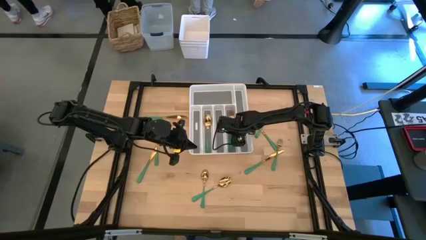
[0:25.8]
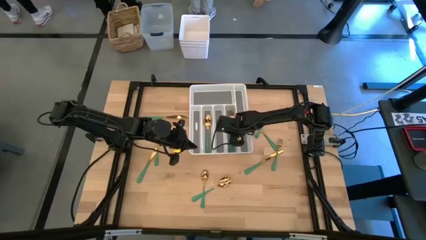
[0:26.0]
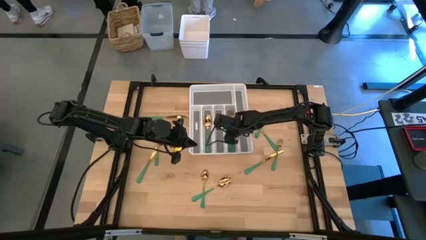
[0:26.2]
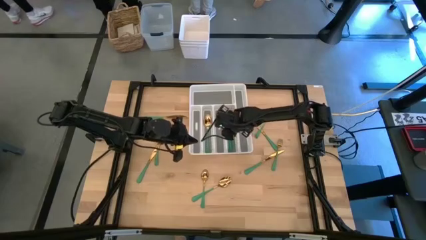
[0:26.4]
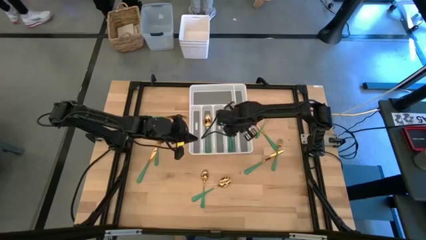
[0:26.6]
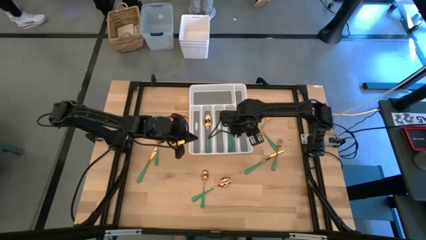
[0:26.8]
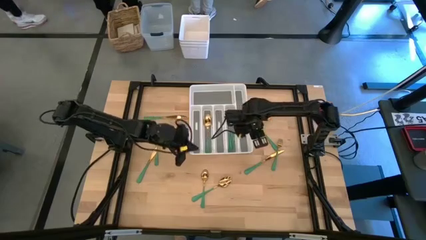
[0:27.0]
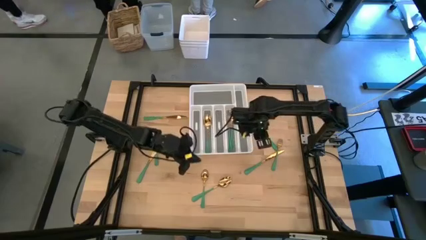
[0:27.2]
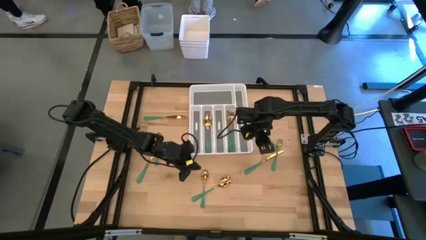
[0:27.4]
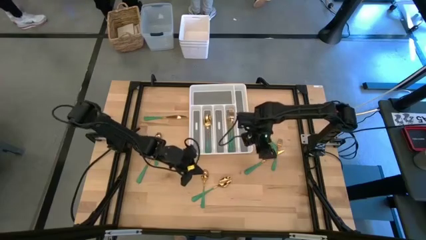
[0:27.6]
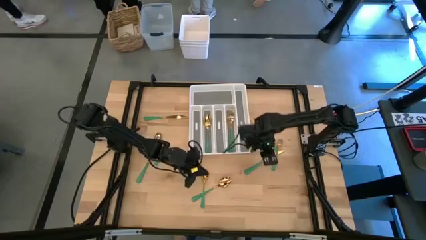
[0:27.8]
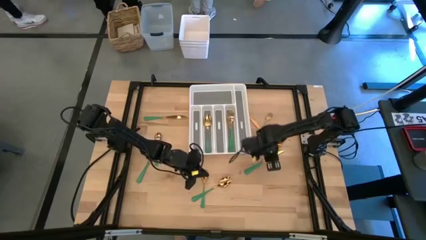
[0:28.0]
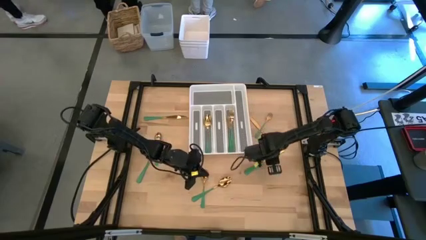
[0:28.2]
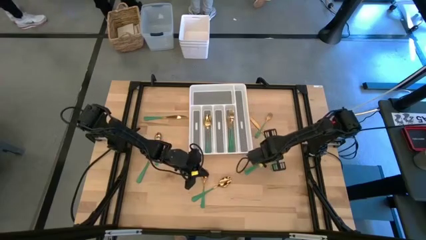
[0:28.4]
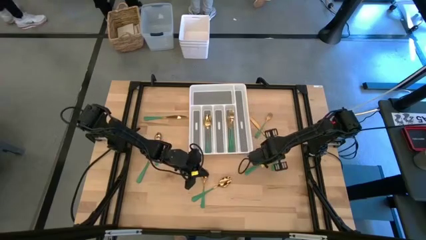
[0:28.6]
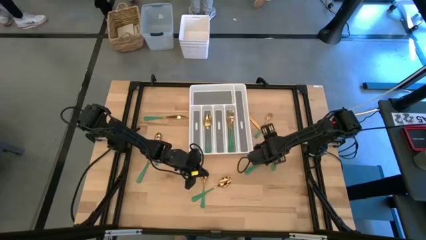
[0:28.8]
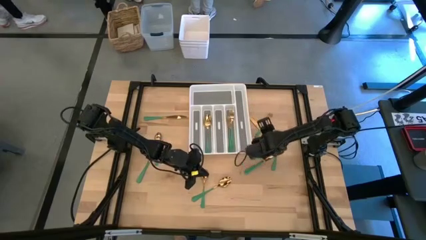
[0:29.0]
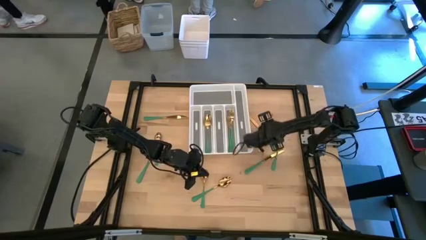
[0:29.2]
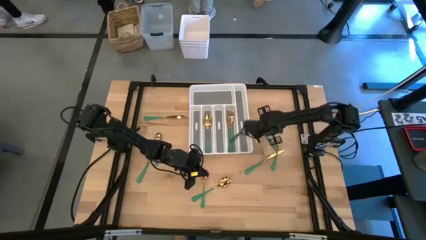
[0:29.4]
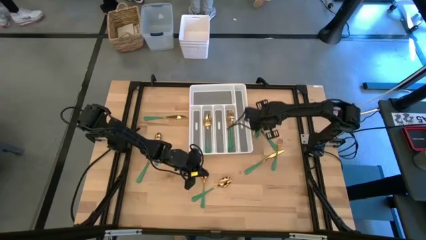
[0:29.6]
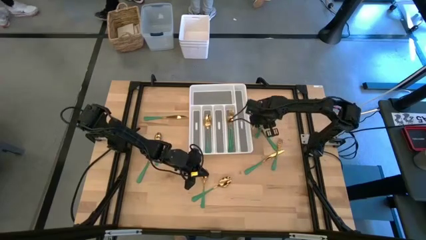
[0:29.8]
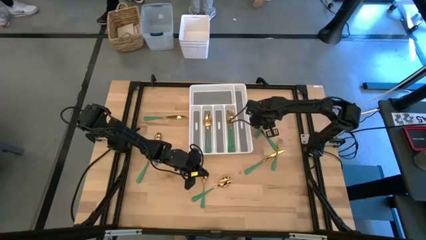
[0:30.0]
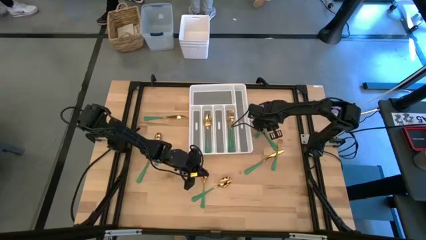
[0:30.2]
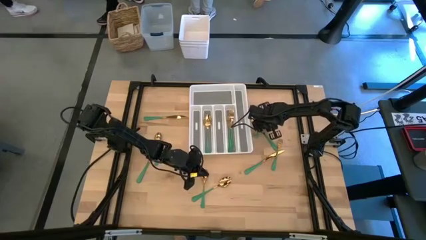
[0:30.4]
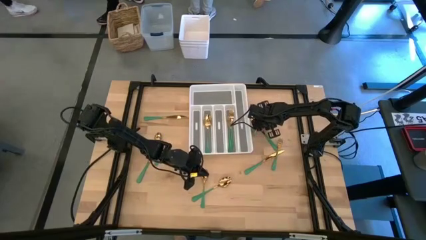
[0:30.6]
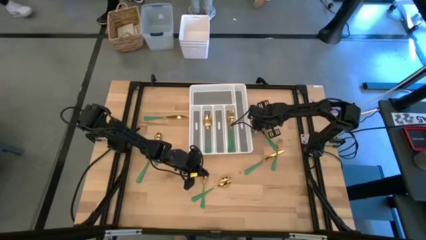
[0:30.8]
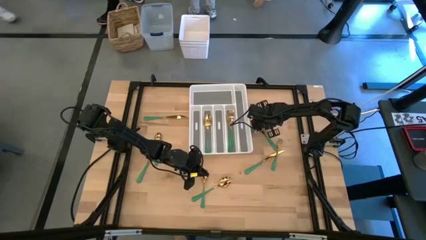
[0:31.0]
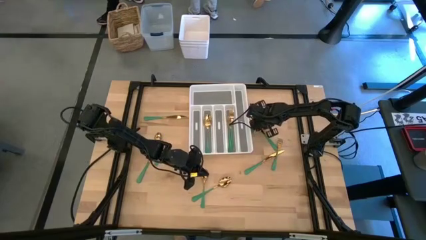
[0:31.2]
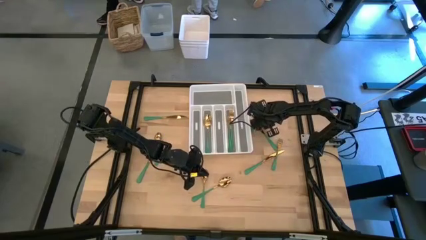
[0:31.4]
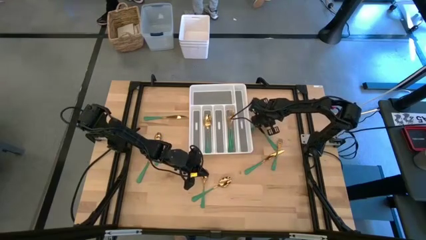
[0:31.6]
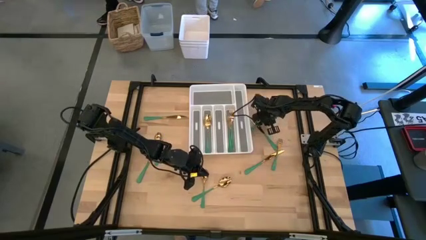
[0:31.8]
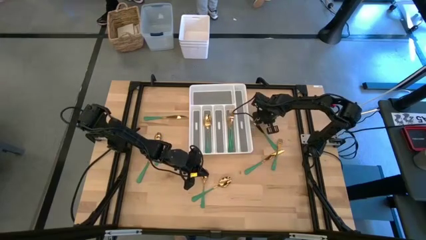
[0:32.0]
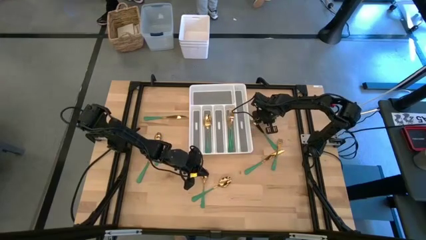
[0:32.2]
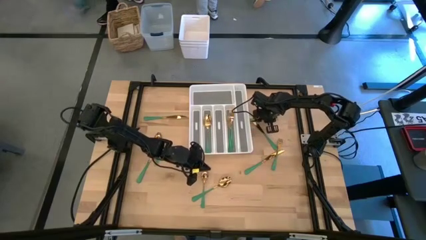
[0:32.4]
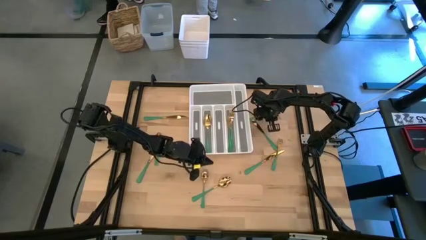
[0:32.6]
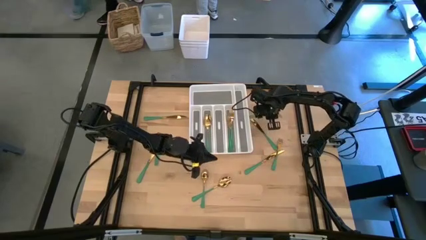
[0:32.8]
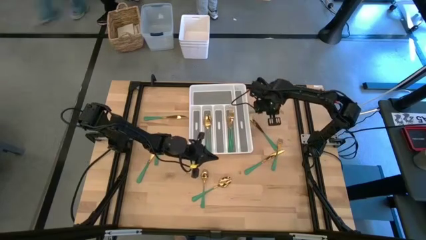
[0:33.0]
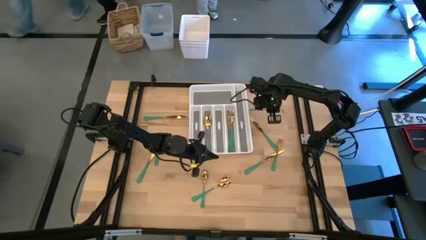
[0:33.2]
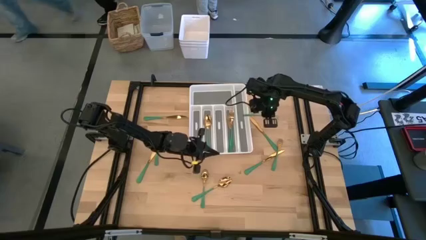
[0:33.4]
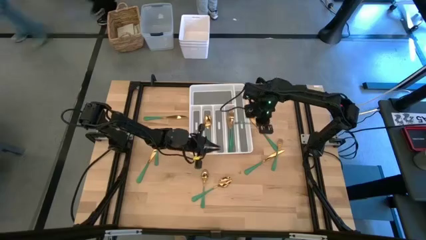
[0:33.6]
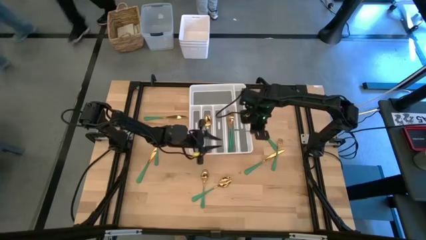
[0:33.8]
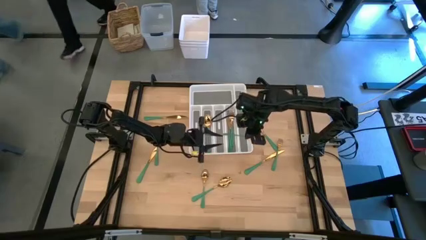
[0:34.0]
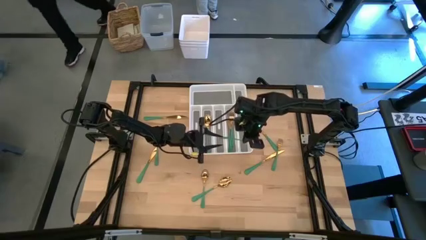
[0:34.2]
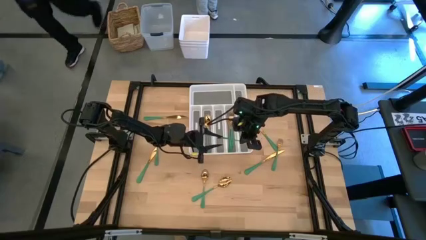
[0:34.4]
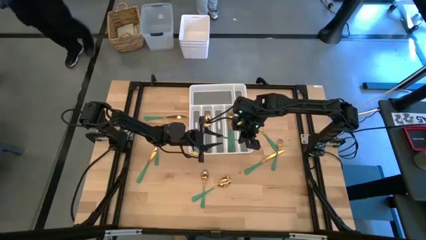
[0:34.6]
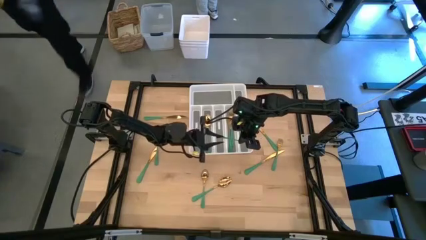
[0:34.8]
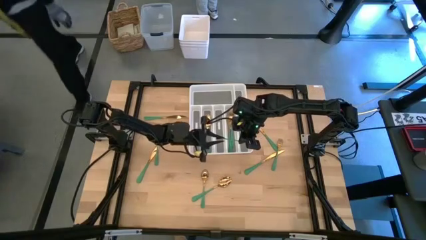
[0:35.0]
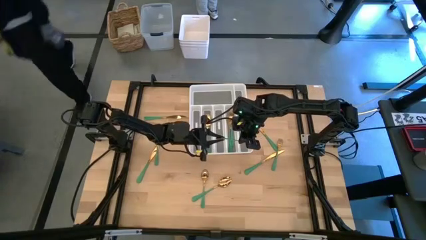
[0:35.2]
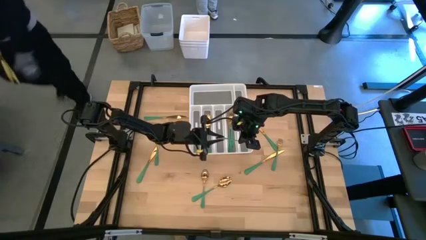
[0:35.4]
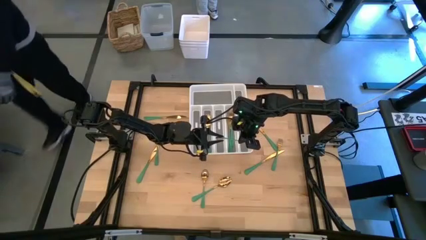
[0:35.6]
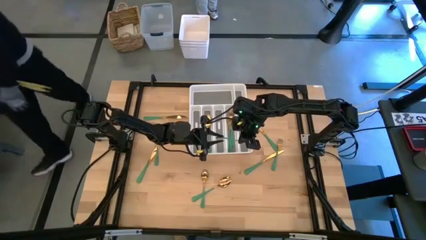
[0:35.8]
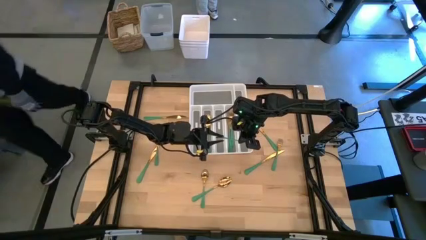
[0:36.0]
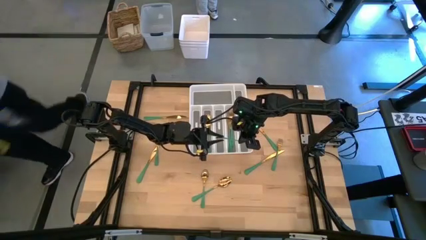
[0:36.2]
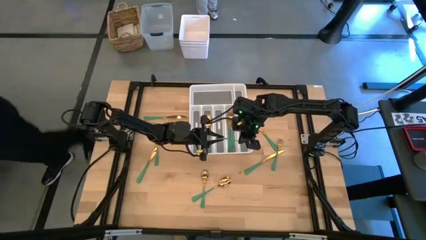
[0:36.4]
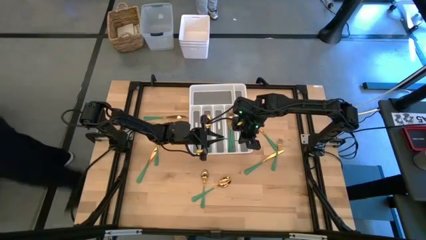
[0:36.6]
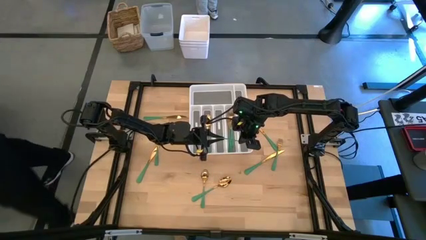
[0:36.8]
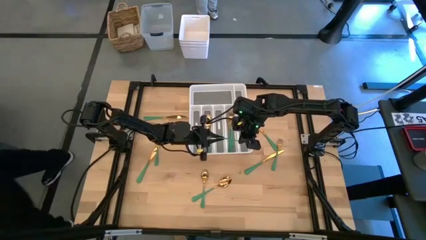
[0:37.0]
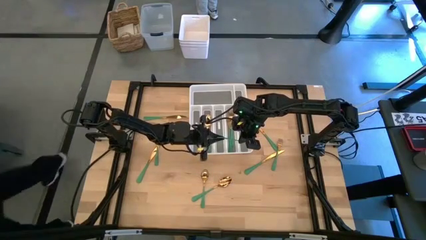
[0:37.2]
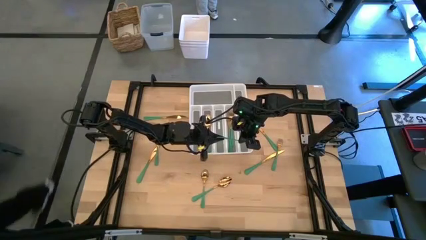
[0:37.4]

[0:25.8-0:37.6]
Task: Sort silverware
Put the top fork into the silverware organizer

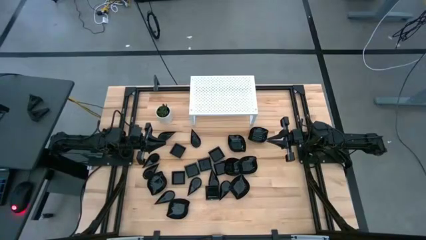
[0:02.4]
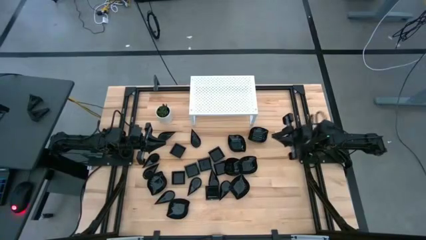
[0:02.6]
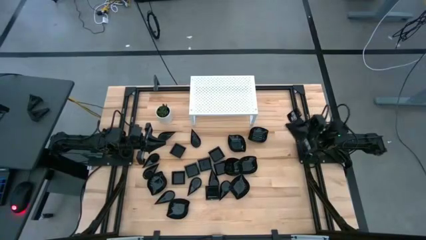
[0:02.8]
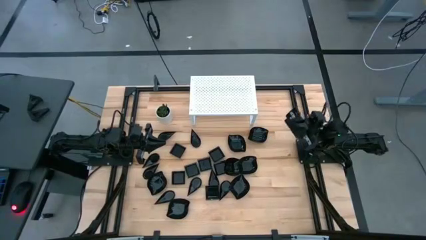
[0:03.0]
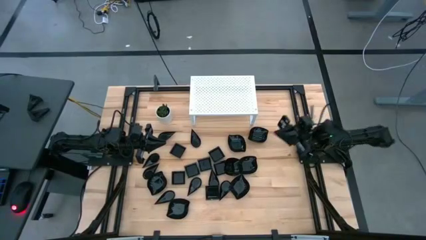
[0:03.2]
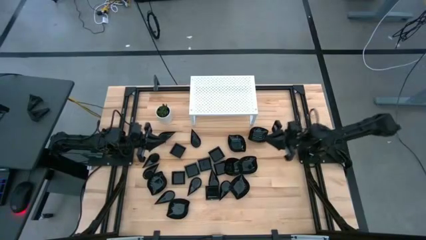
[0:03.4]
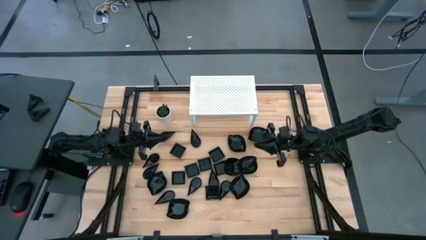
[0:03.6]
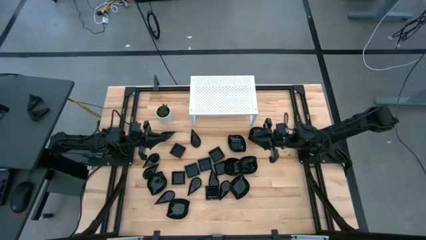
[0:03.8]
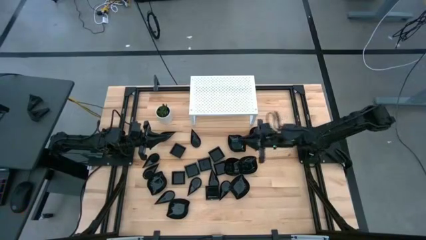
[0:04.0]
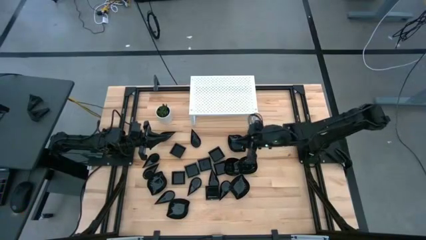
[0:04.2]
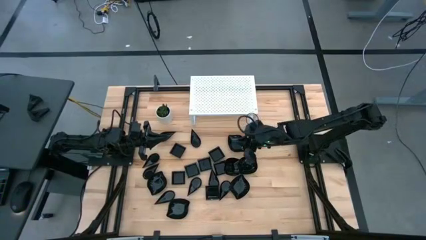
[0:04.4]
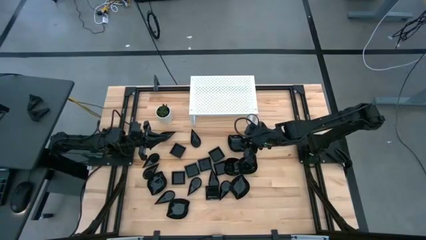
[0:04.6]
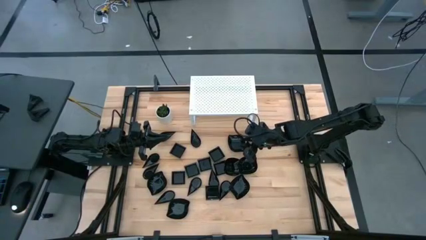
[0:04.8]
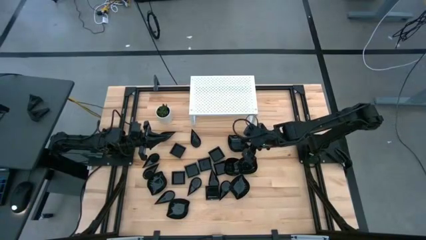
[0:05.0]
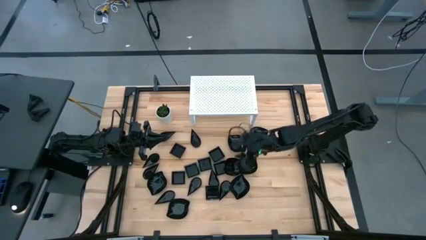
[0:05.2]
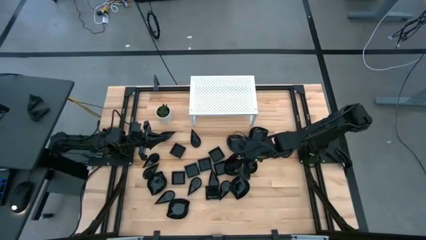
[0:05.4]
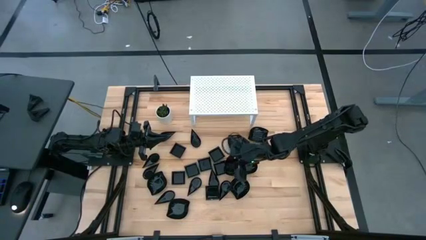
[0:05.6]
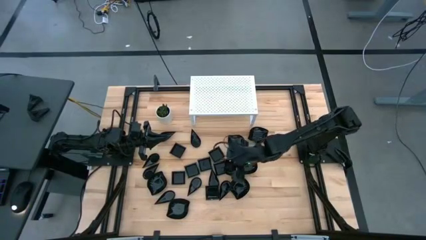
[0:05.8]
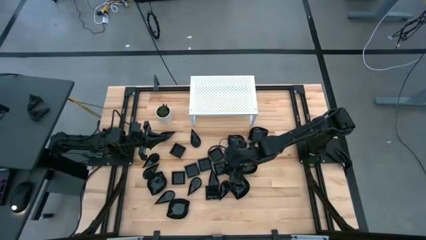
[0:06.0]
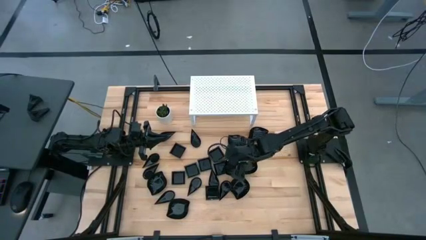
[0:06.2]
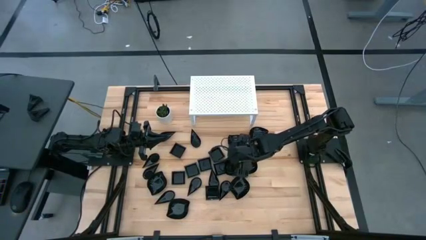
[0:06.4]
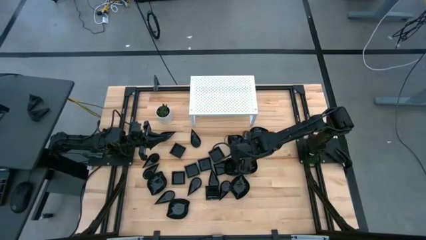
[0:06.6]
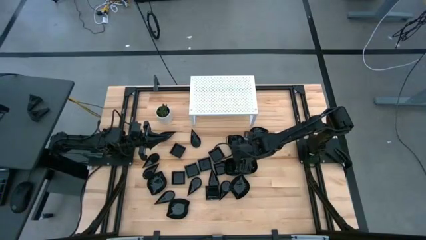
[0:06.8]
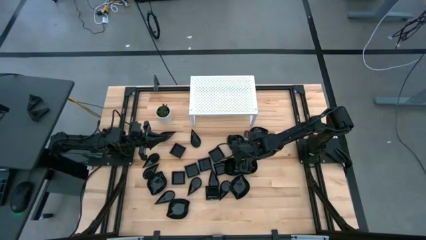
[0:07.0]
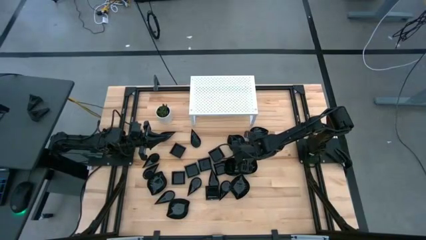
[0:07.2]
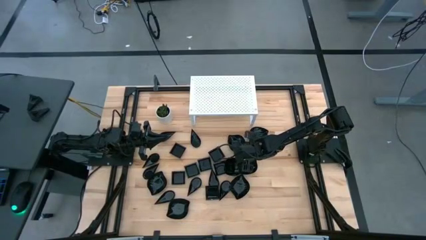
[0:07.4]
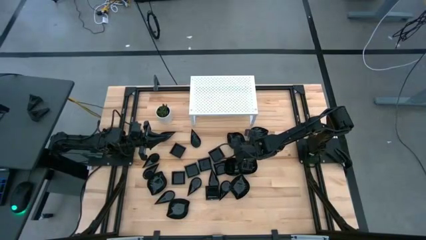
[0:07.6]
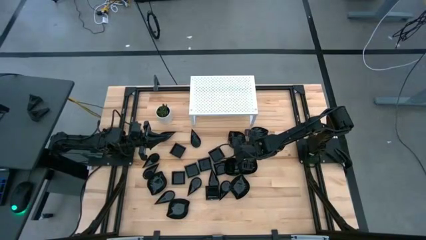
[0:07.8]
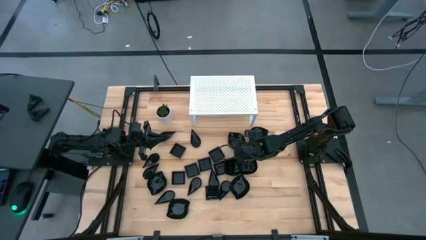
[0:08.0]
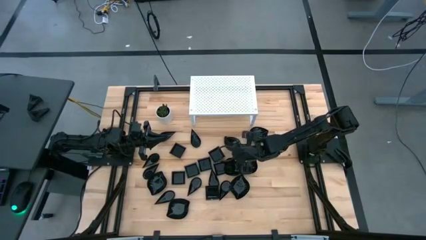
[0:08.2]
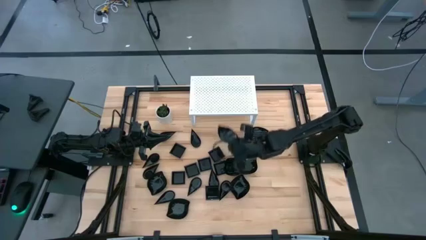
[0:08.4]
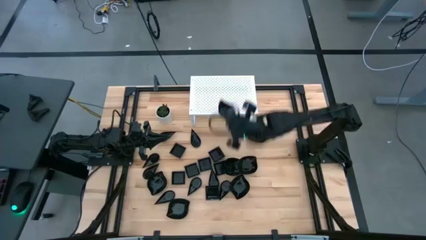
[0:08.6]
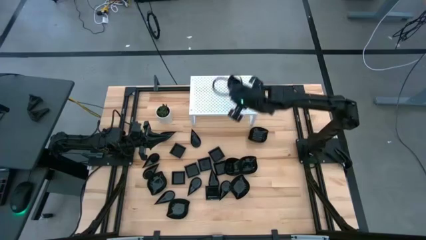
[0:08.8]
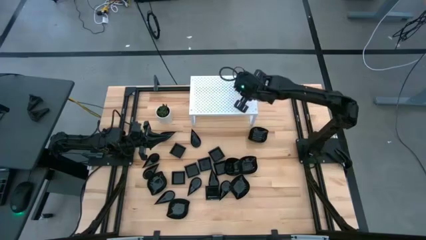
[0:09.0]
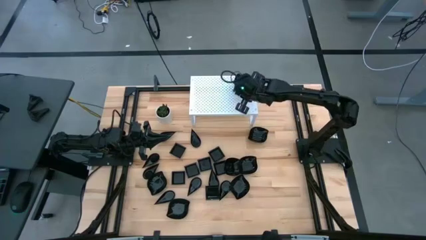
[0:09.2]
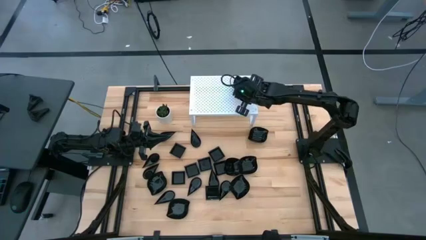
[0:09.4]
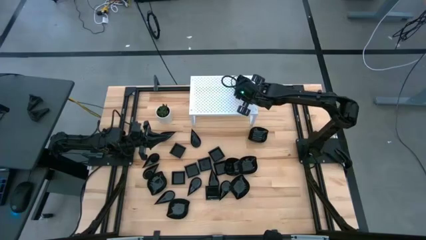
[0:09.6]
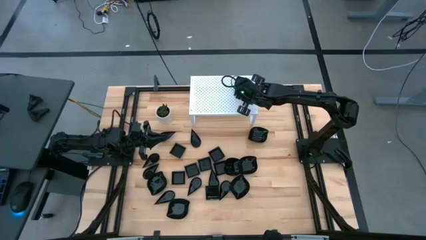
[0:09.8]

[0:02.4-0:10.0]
Task: Pick & Place Mini shaped plates
Put the black plate on the shelf
